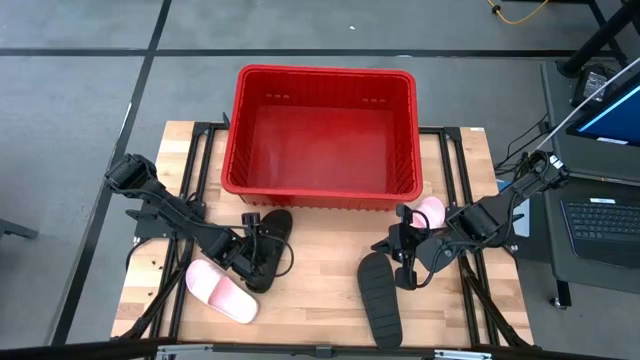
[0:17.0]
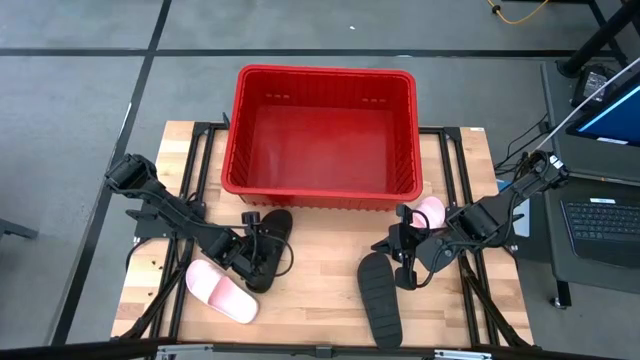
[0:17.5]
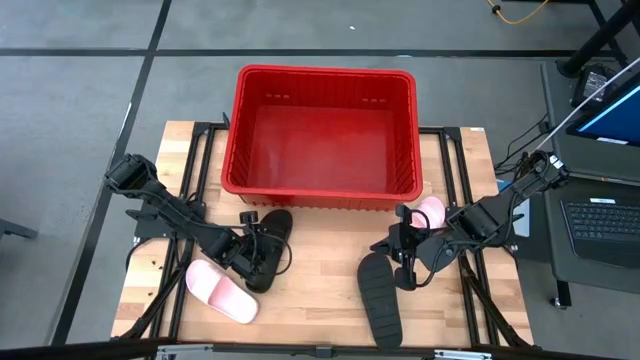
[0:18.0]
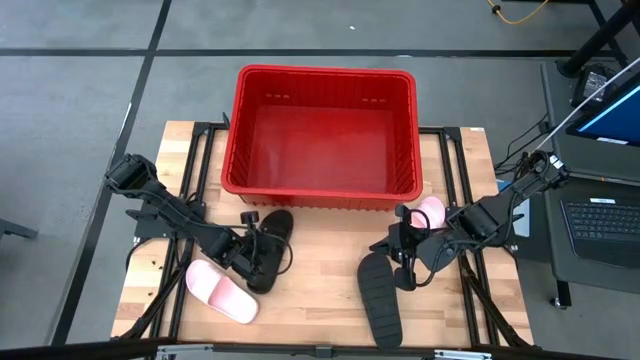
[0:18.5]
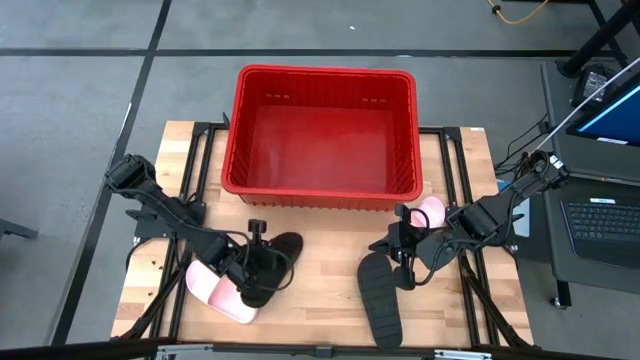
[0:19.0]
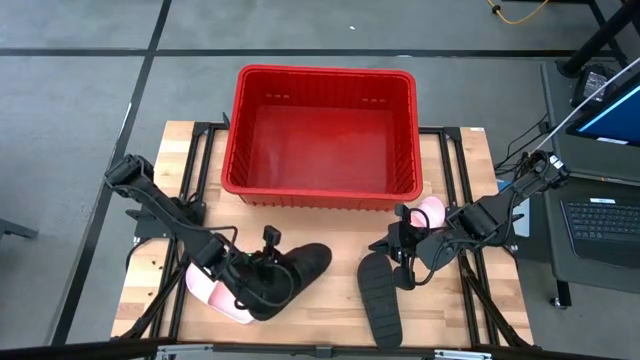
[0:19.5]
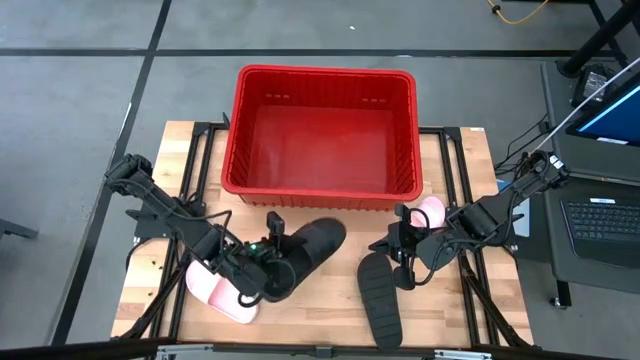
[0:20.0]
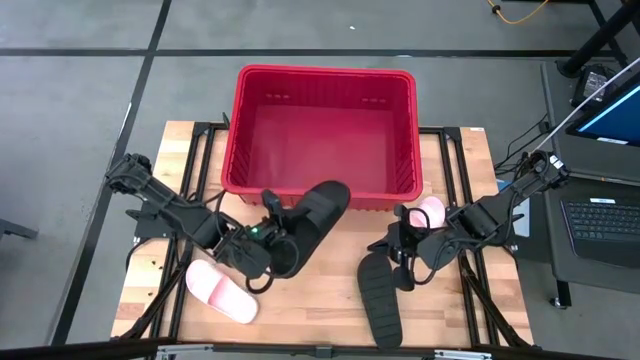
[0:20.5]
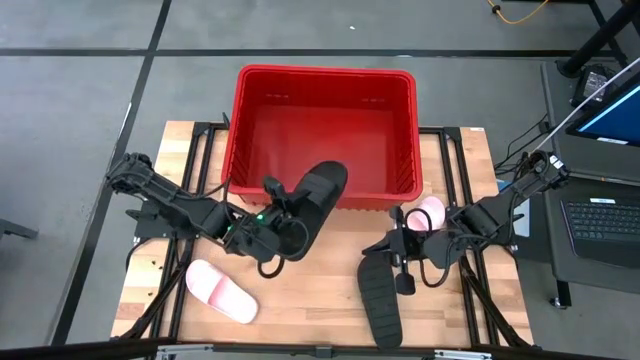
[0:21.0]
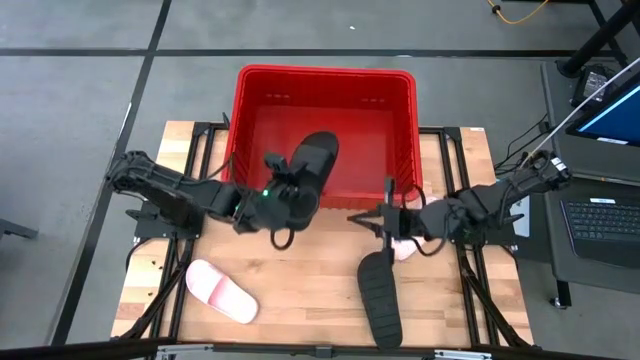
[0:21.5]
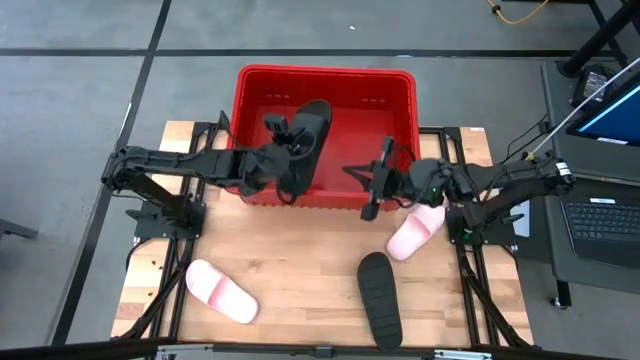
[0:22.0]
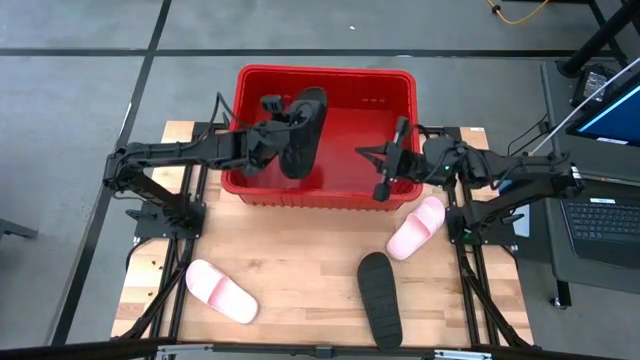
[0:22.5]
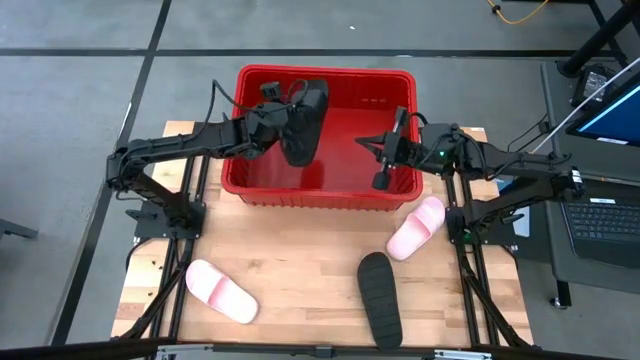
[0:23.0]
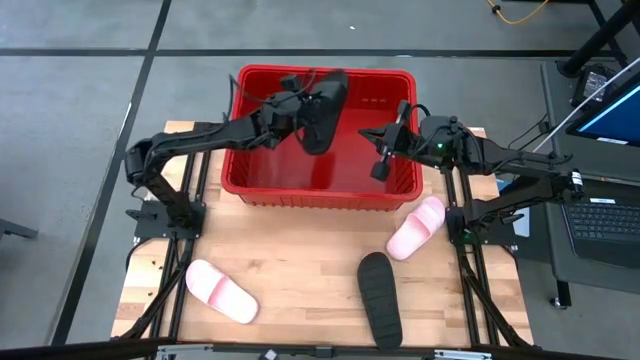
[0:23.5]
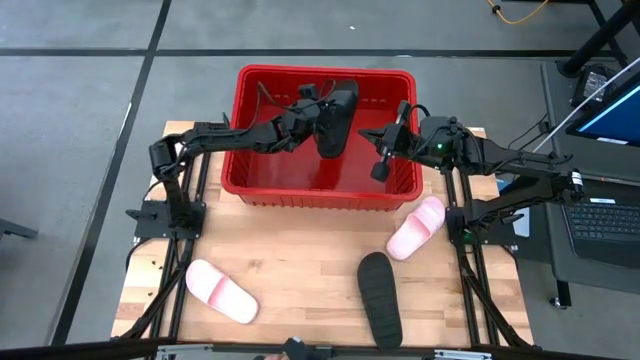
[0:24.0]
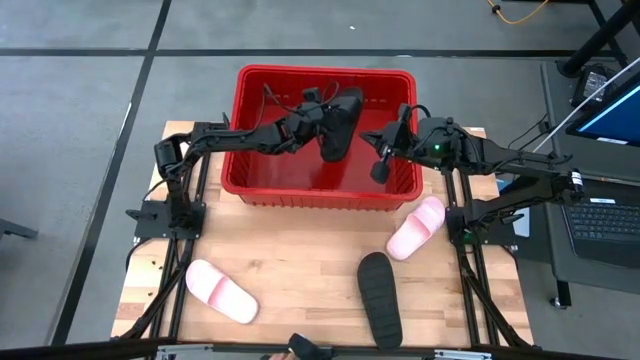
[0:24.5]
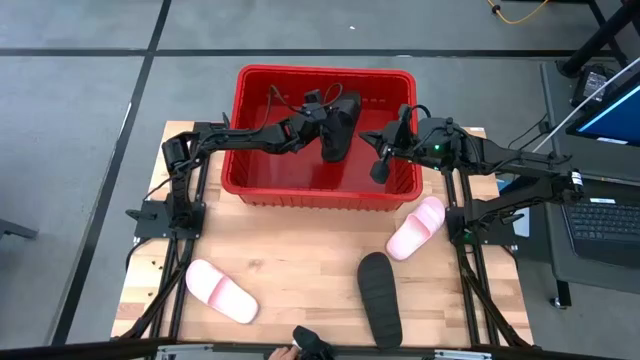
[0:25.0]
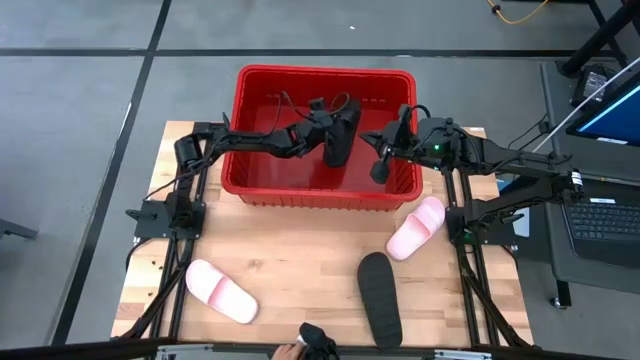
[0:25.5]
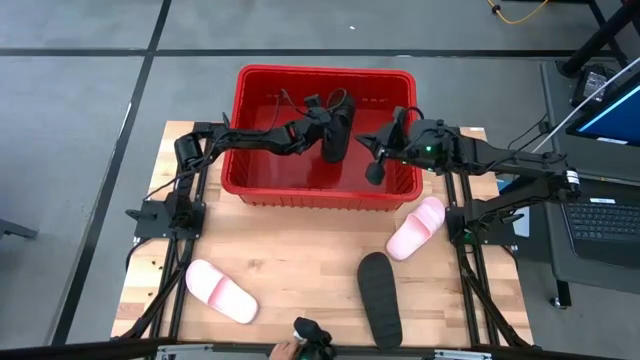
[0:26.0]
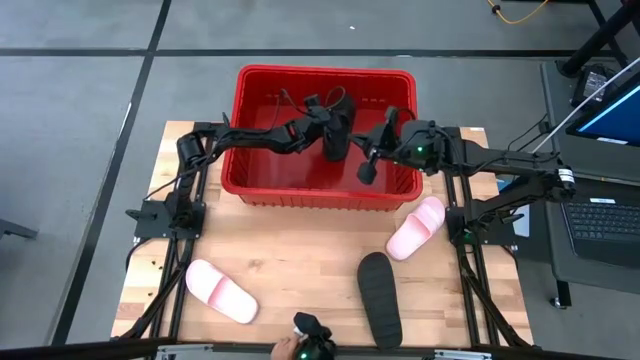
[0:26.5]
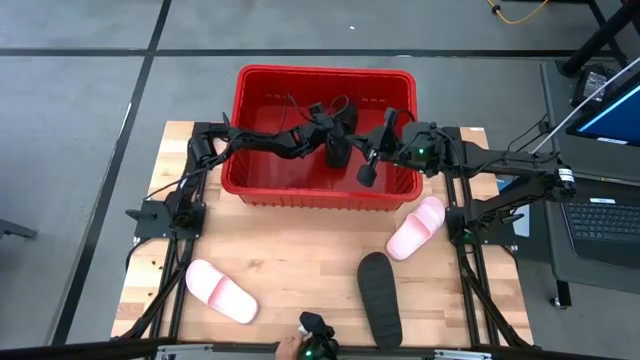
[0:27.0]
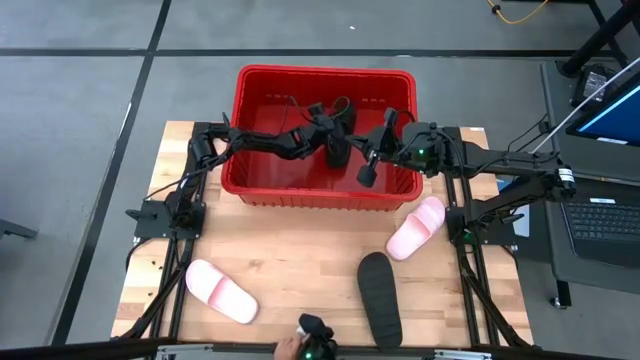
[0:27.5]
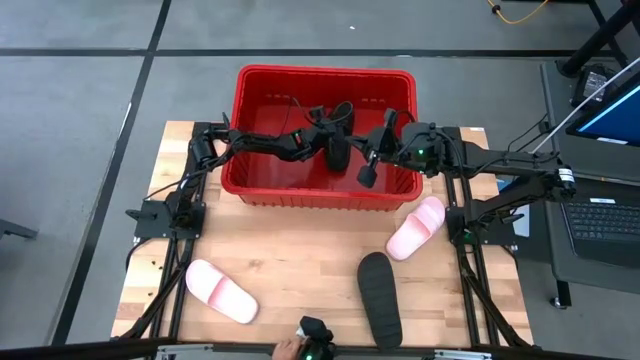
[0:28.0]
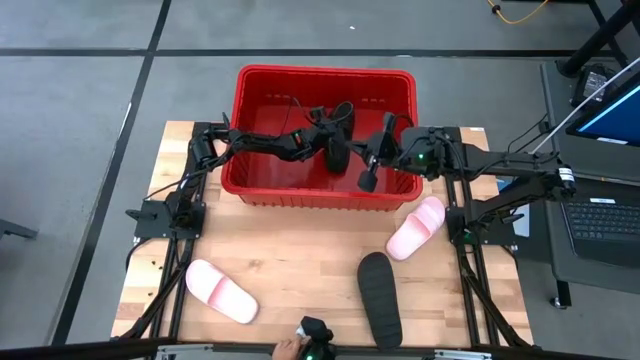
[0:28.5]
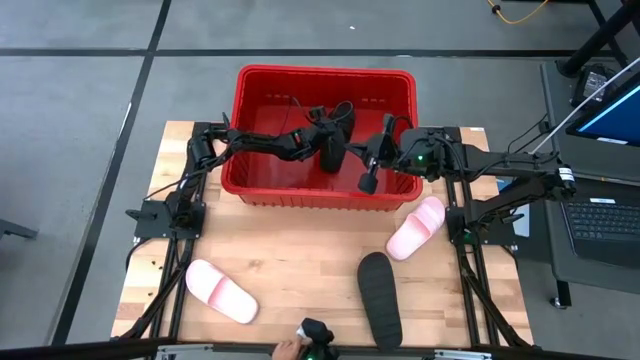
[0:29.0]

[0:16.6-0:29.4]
Task: Pick and place slides into bin
Put the left black slide into the red bin

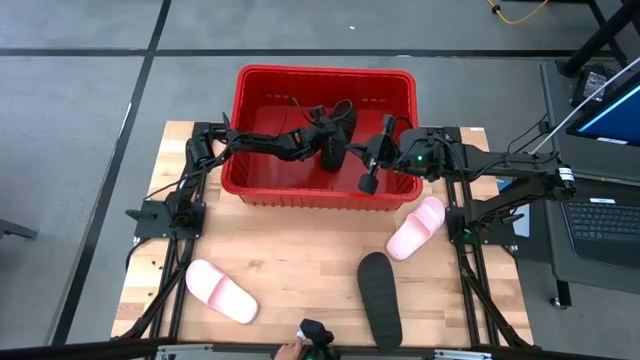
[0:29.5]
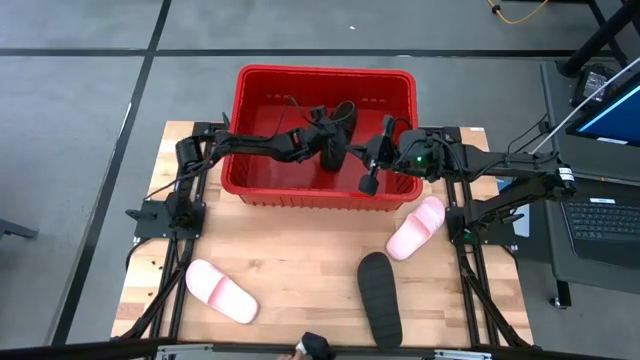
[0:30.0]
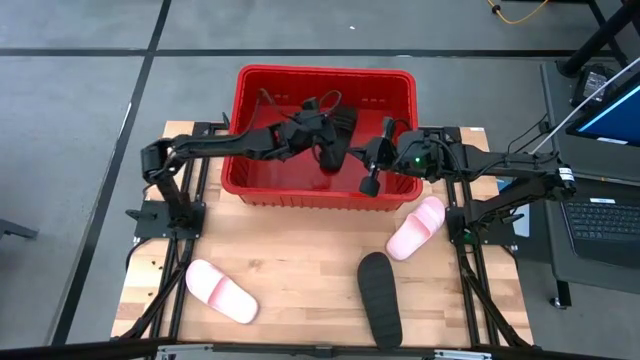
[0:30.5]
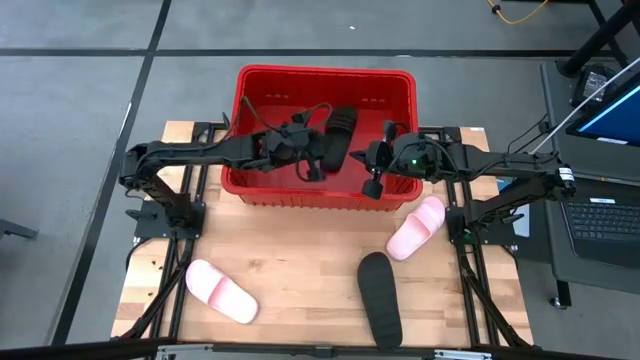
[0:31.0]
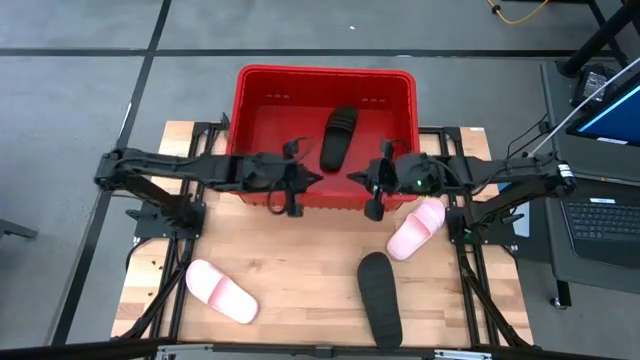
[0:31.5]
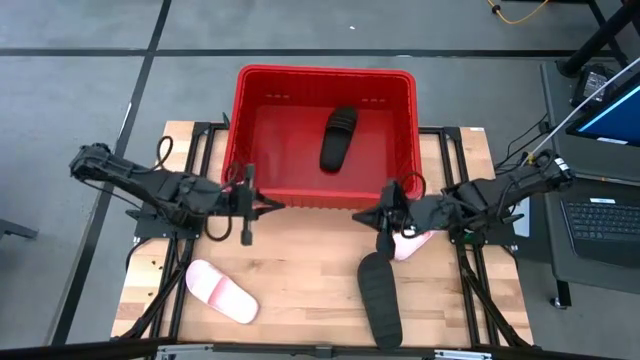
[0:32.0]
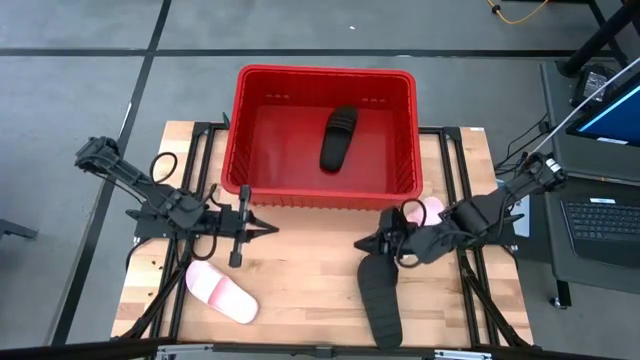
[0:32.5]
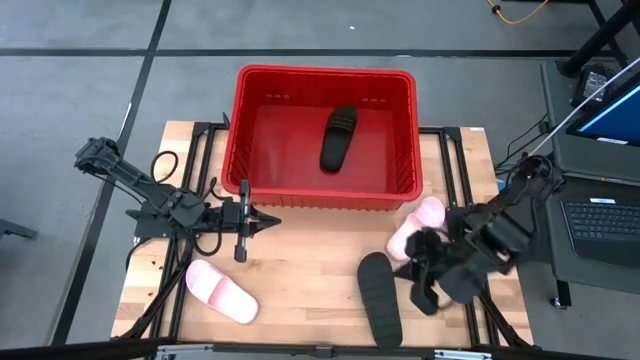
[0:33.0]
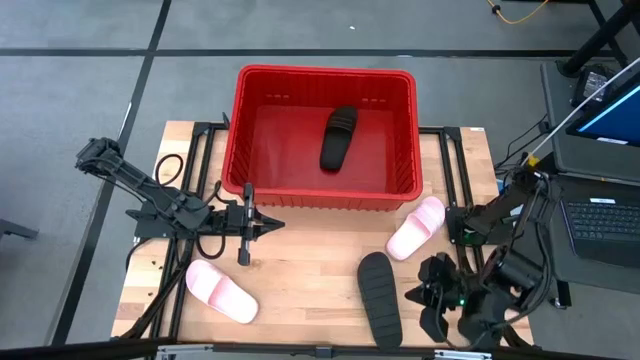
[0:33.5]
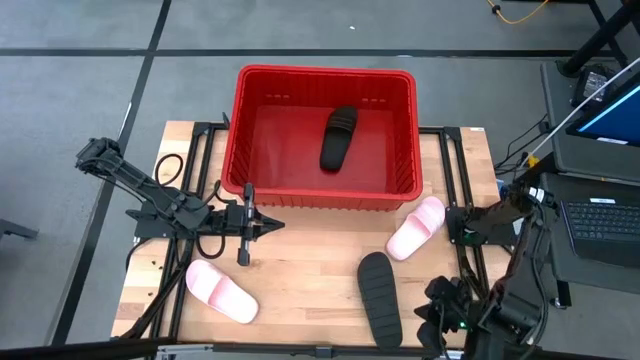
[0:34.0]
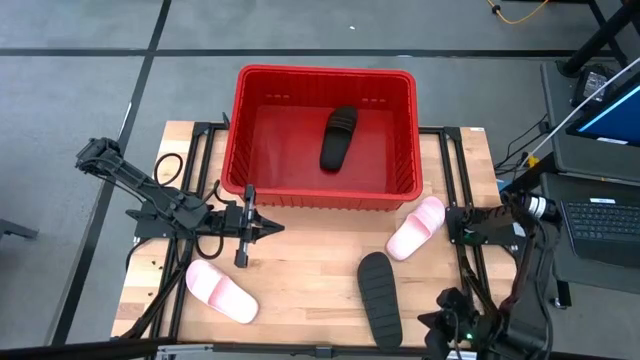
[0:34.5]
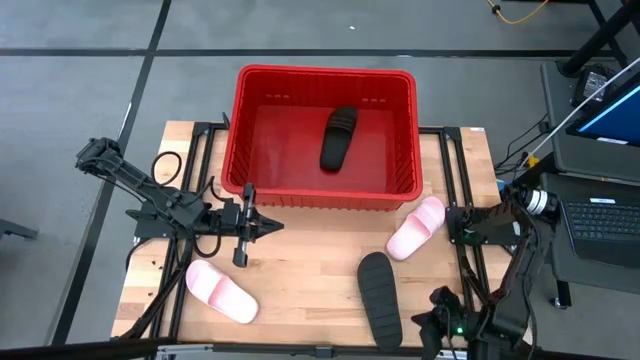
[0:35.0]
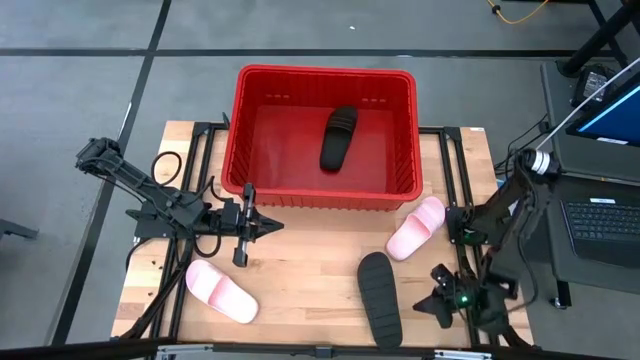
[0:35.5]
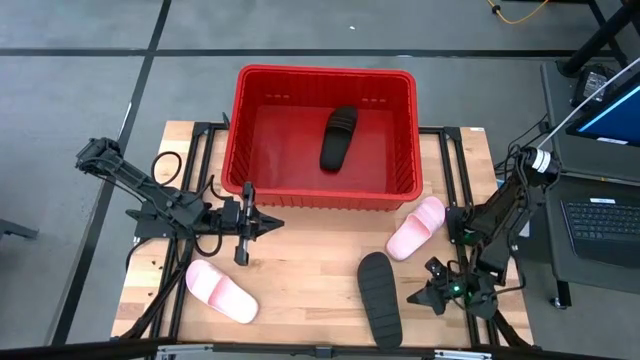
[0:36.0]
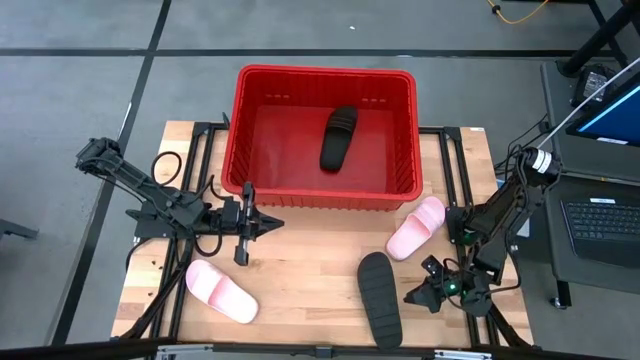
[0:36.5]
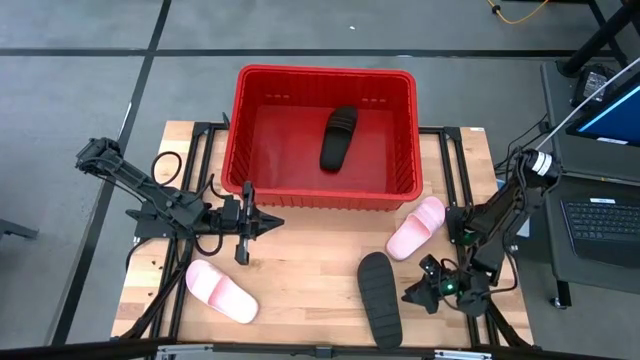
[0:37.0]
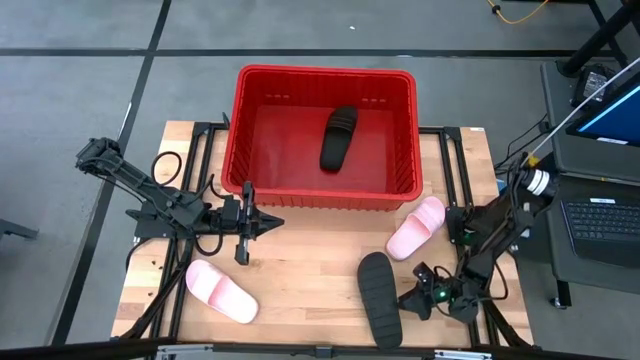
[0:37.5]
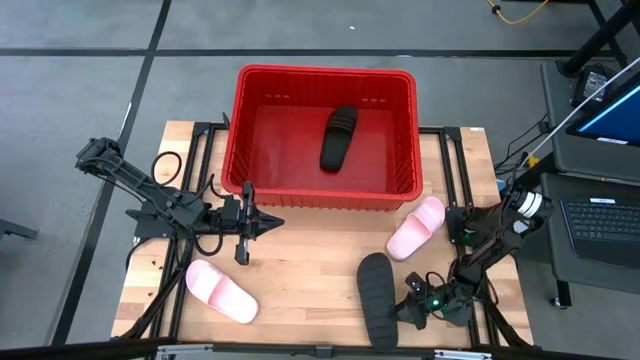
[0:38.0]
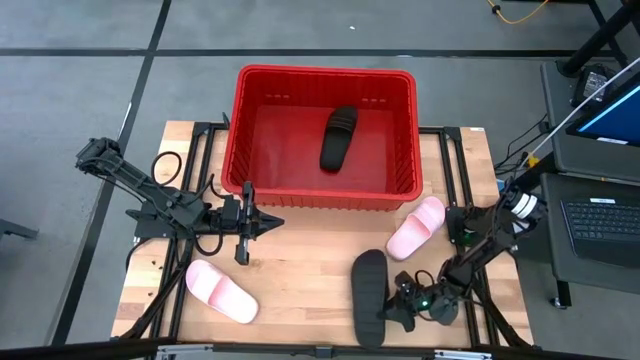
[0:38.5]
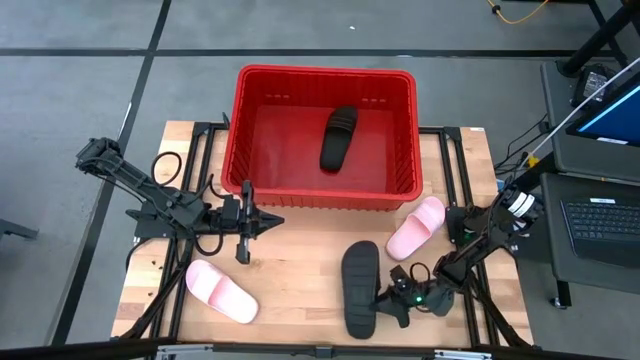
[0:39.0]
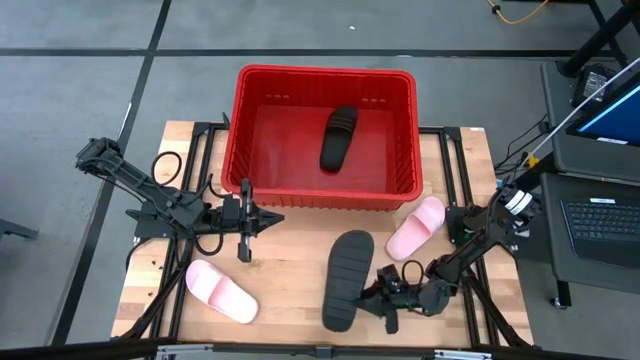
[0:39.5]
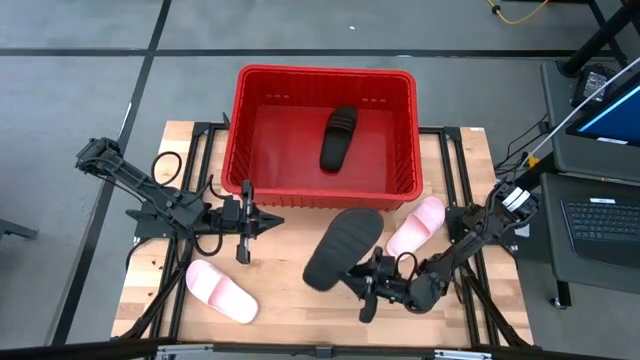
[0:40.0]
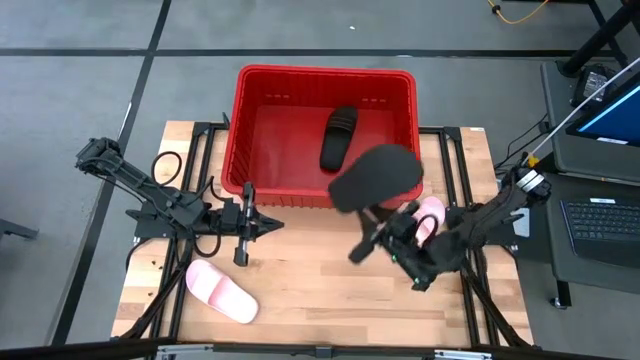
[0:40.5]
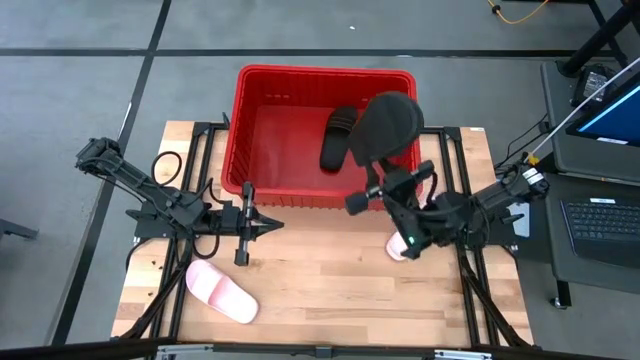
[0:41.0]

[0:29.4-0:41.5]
Put the black slide into the red bin
